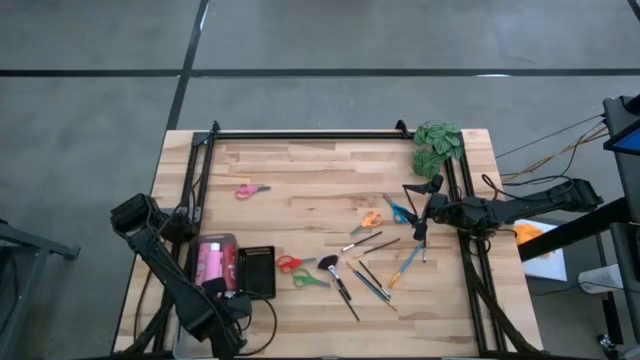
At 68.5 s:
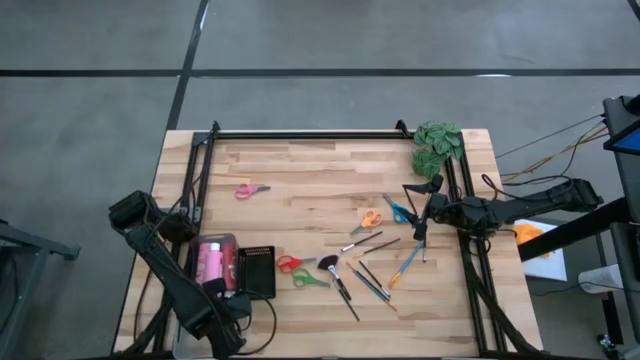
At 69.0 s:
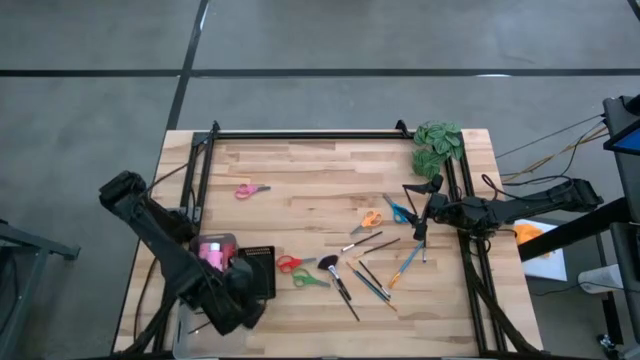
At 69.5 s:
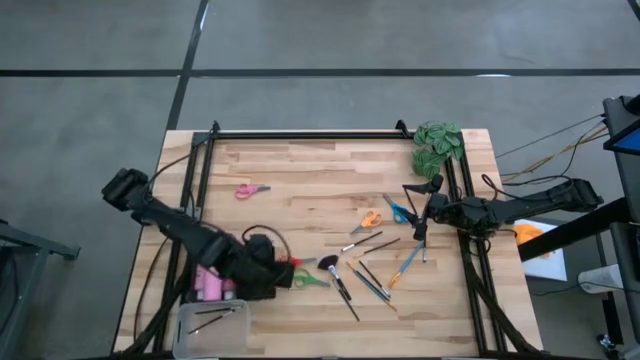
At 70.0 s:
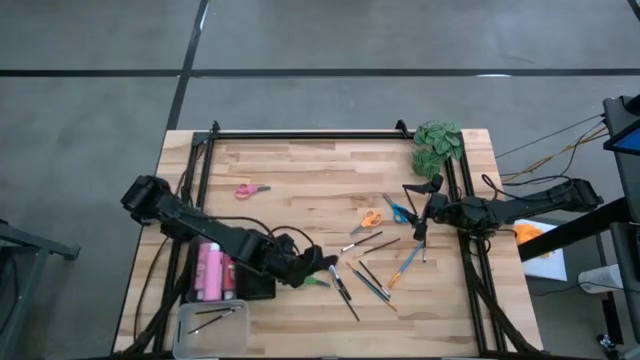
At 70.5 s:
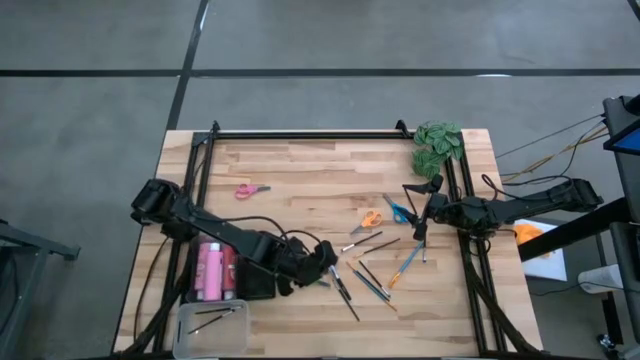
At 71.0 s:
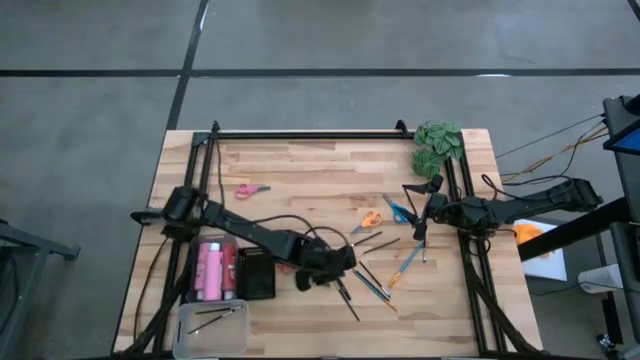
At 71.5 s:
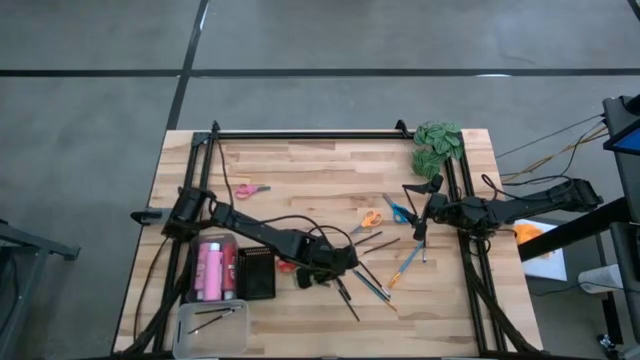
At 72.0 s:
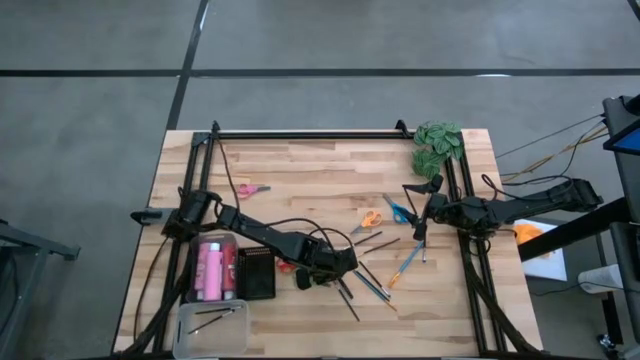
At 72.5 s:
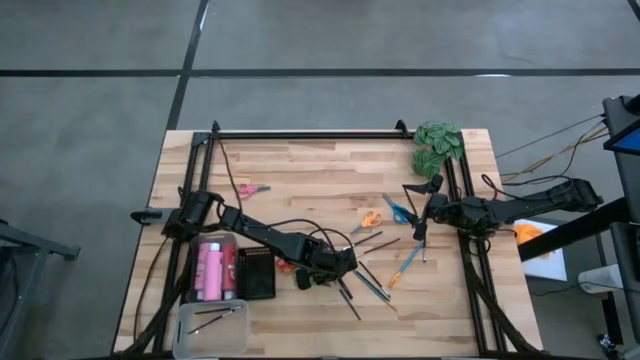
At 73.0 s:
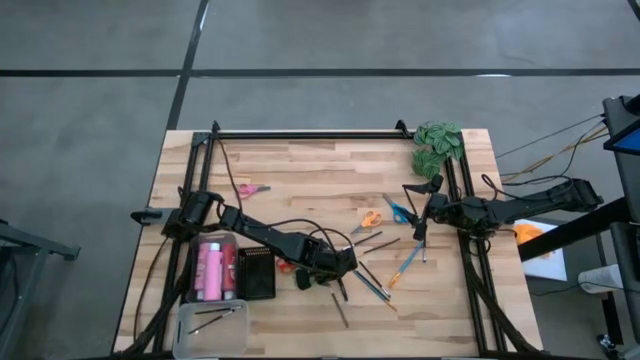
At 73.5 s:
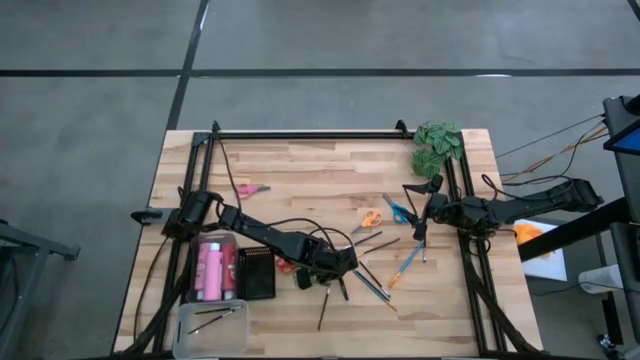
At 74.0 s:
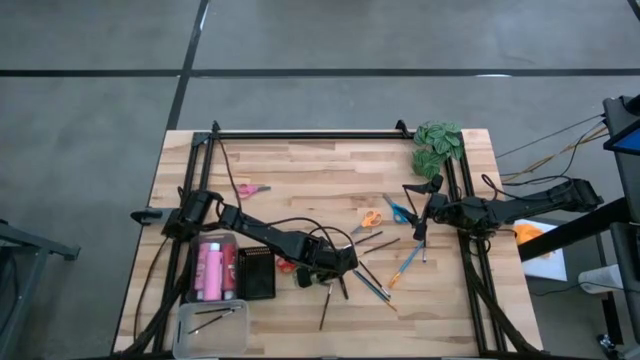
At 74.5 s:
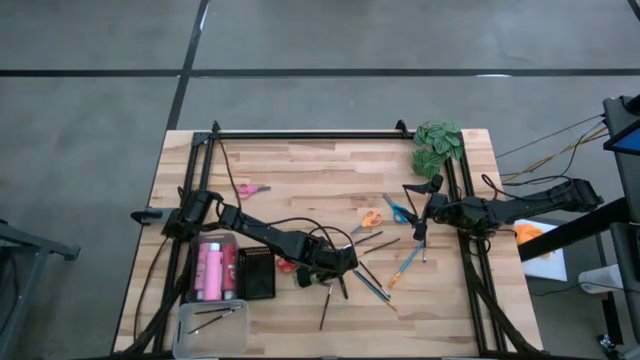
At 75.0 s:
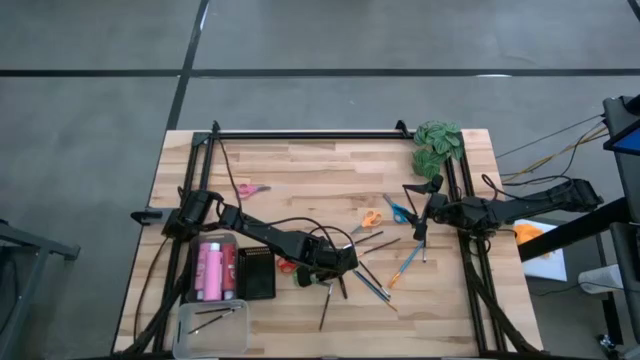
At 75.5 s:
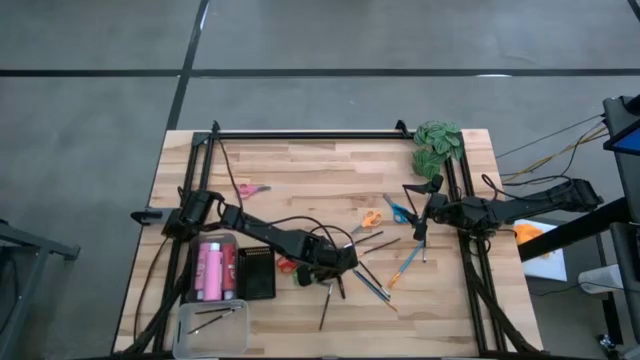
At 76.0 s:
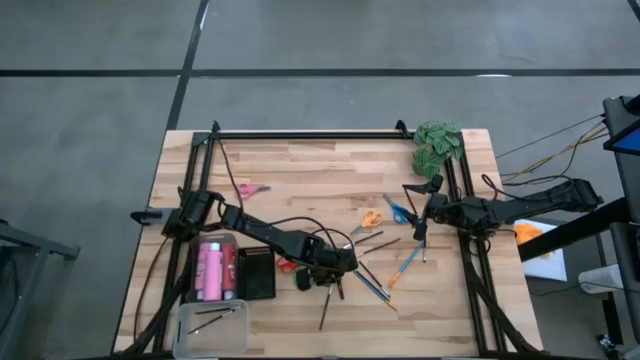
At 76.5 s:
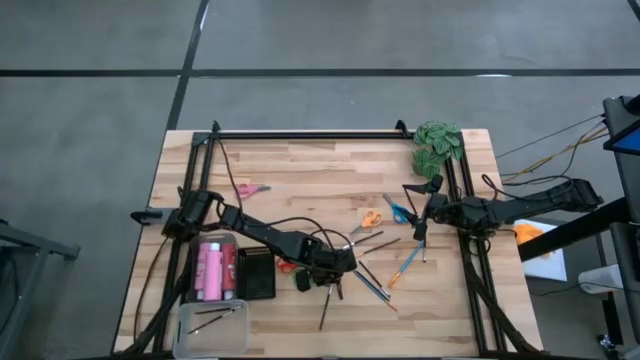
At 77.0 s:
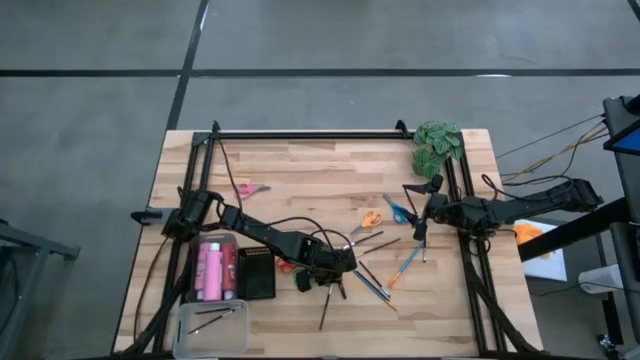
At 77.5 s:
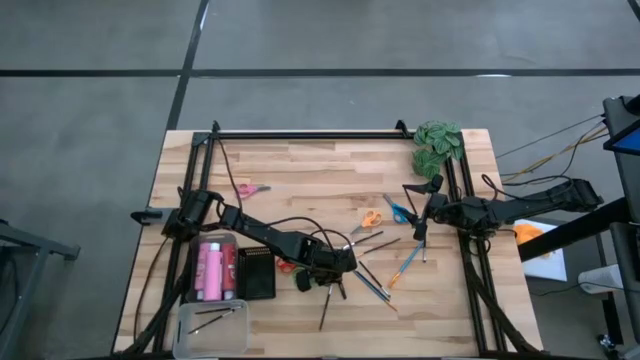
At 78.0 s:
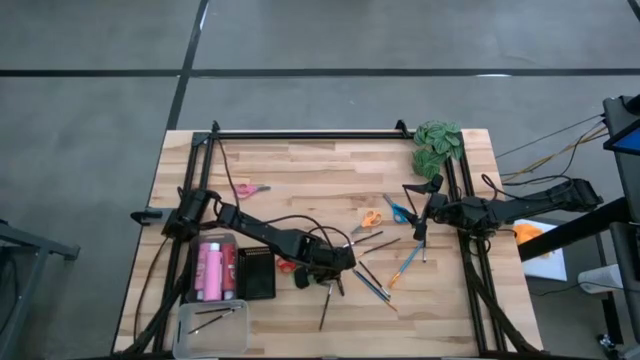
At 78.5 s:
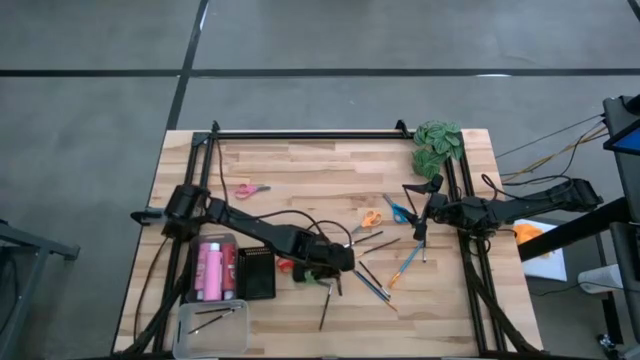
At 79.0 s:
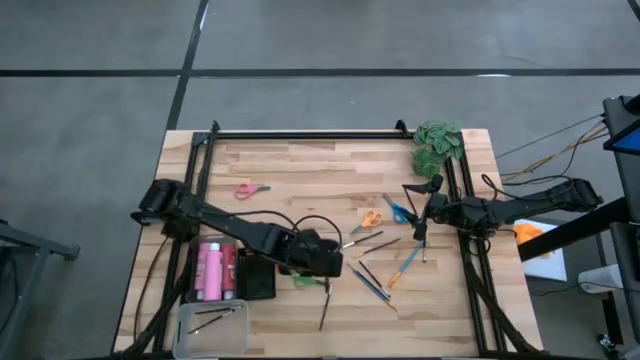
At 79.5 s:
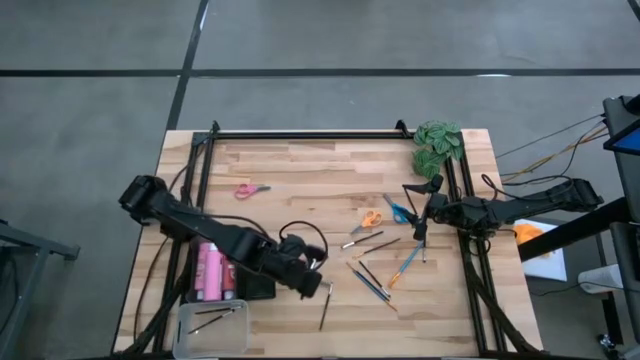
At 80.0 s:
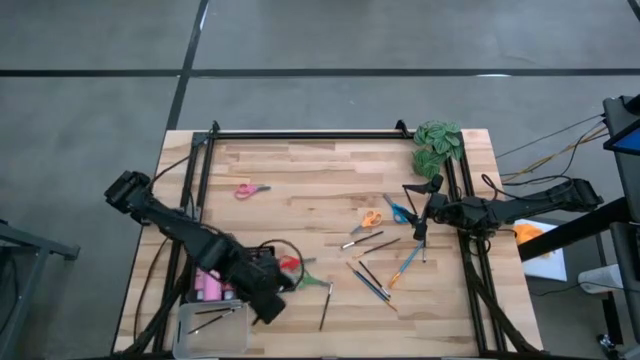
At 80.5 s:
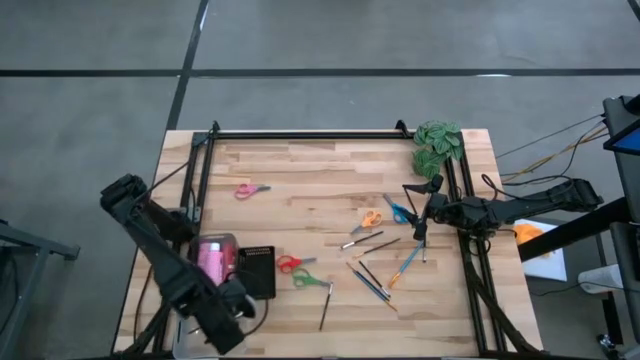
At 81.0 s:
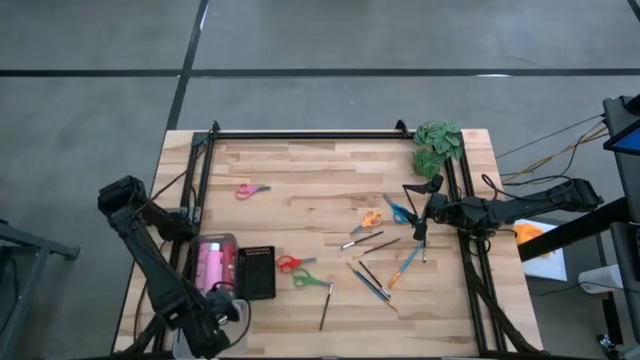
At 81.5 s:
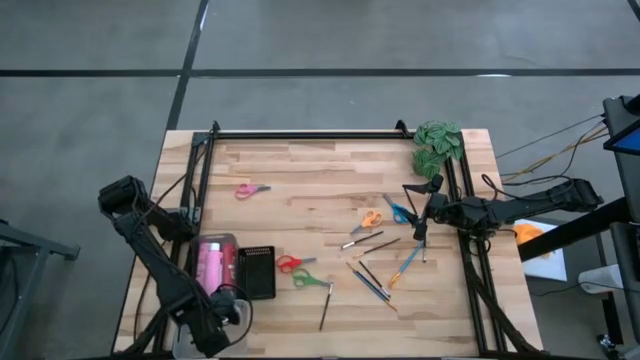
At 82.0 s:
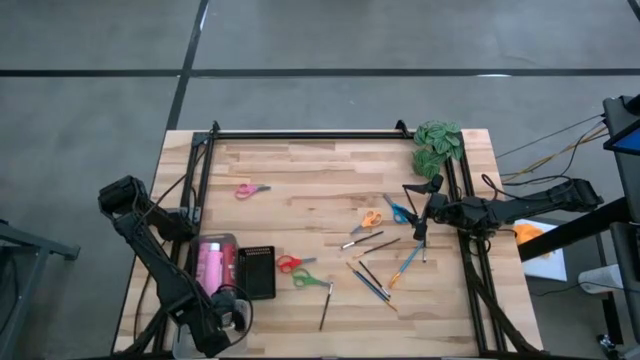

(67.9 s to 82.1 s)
Task: Pick & Place Paint Supplies
Put the silver paint brush into the transparent bin

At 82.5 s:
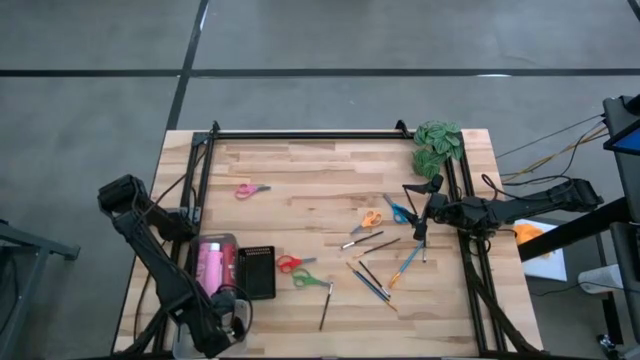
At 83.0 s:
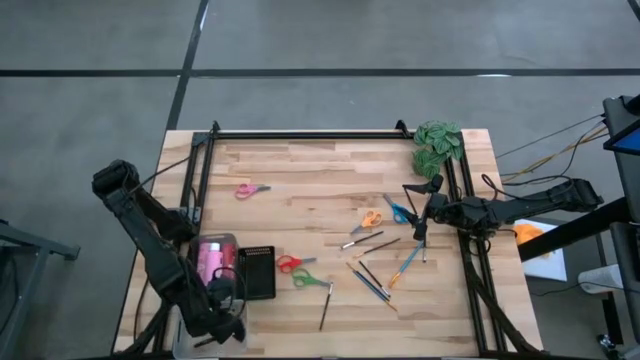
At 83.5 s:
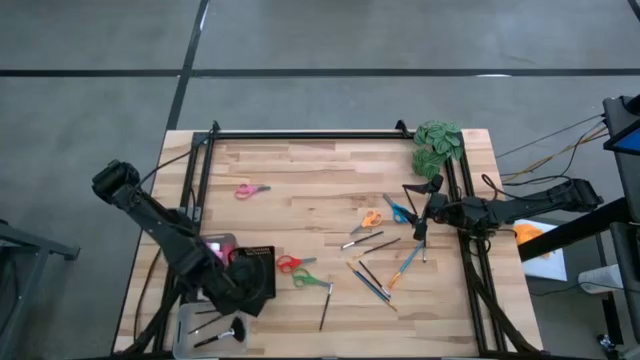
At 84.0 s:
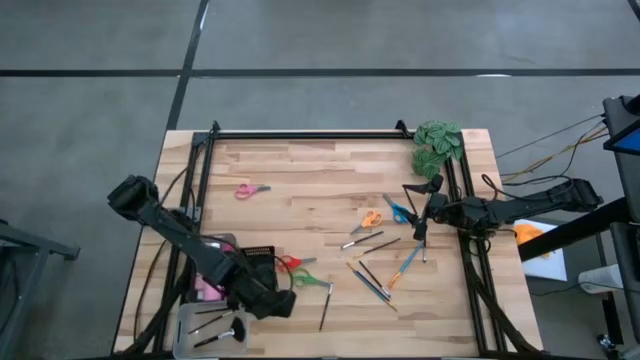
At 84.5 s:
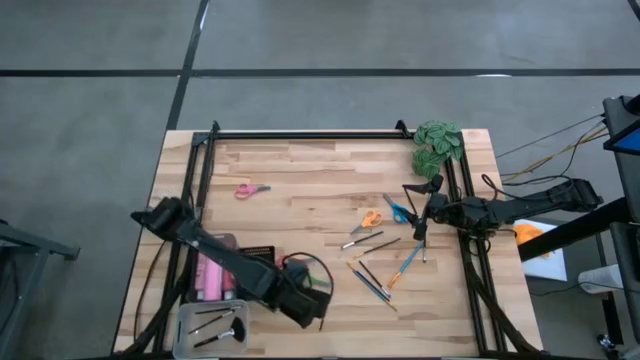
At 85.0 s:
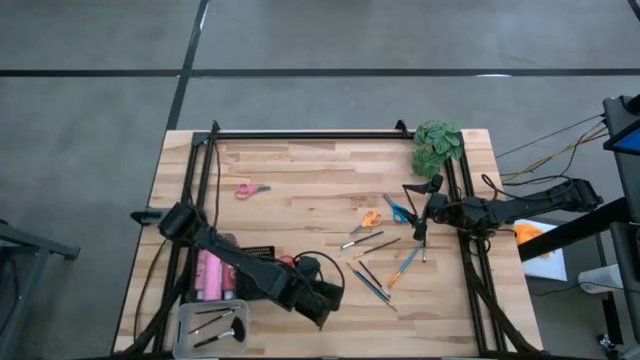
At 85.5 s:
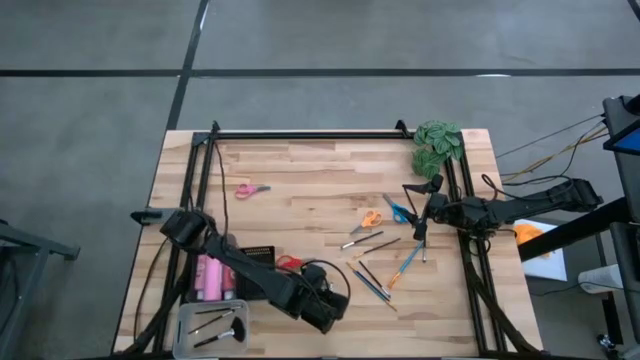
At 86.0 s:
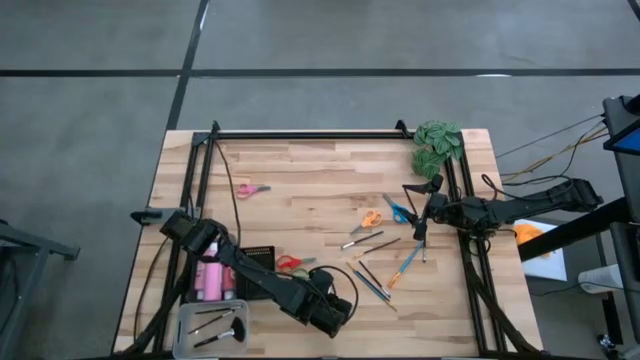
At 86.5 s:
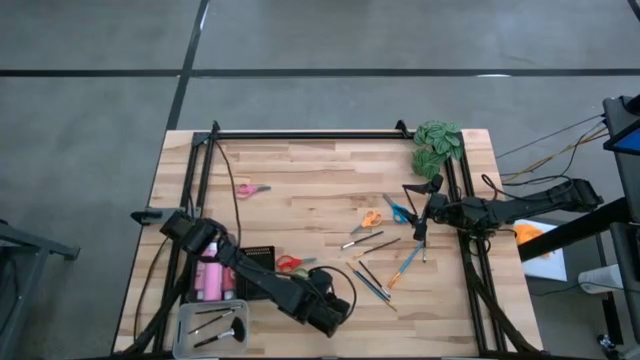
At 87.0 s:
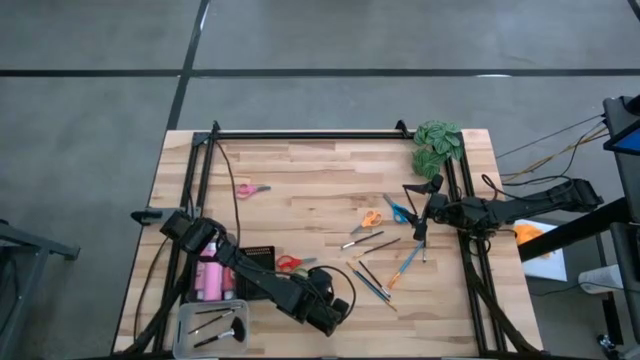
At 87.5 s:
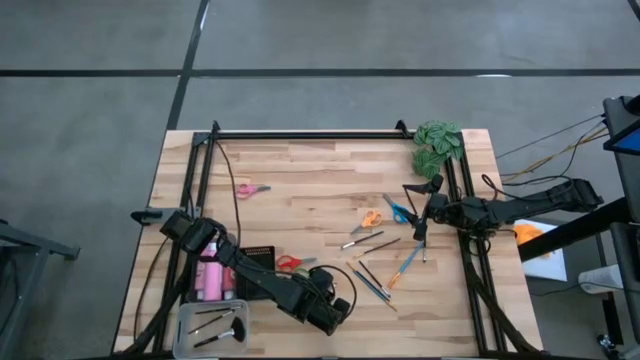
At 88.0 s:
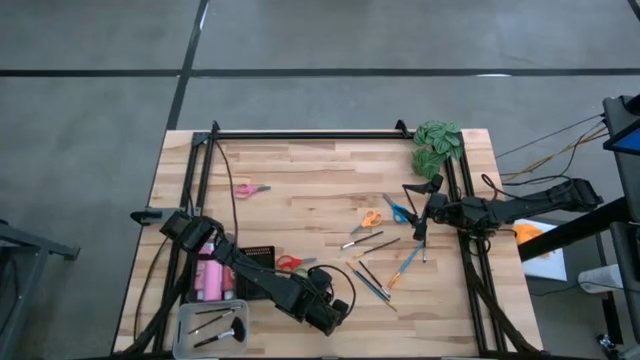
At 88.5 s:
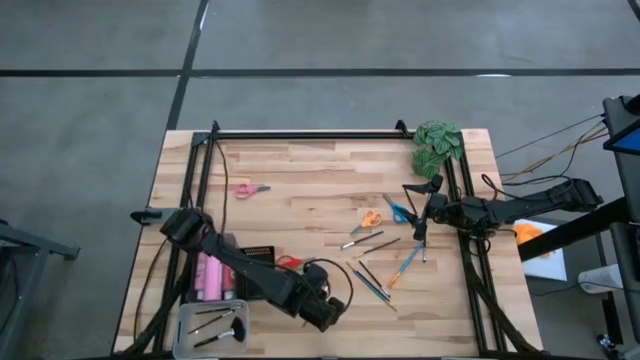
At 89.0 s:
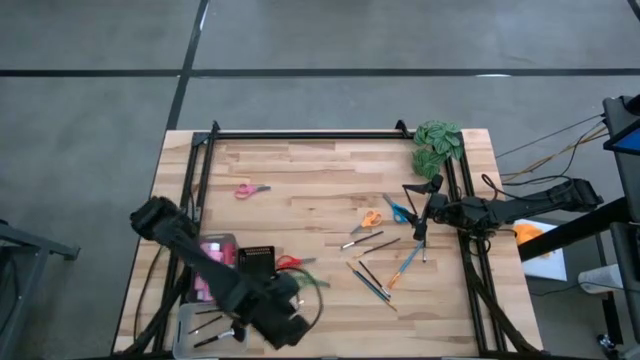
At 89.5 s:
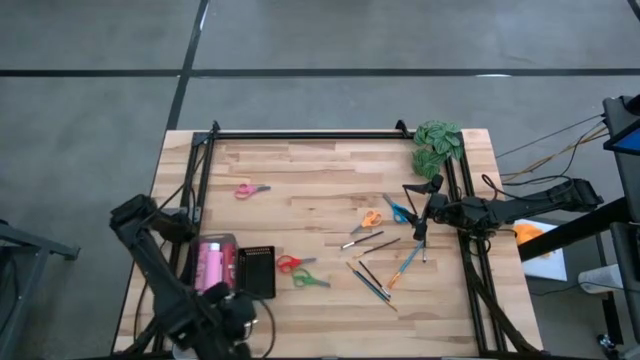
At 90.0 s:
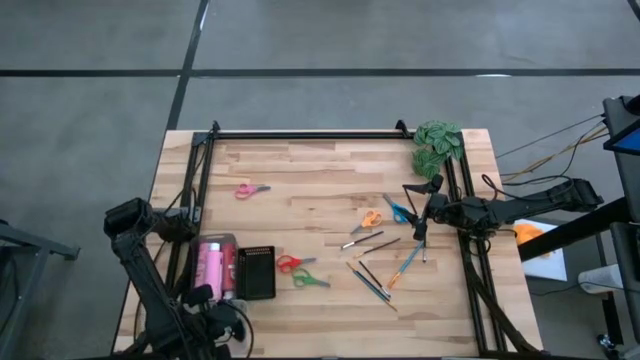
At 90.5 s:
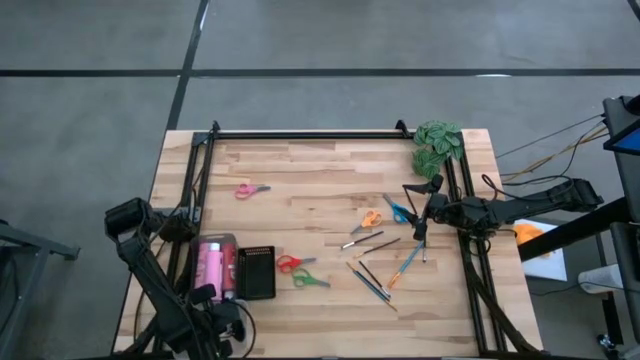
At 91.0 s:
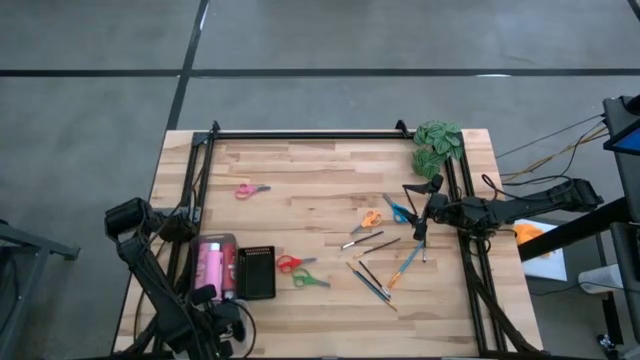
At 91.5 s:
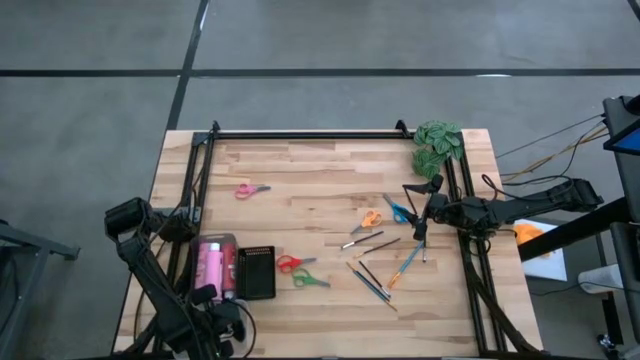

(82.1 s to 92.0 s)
Put the silver paint brush into the transparent bin
